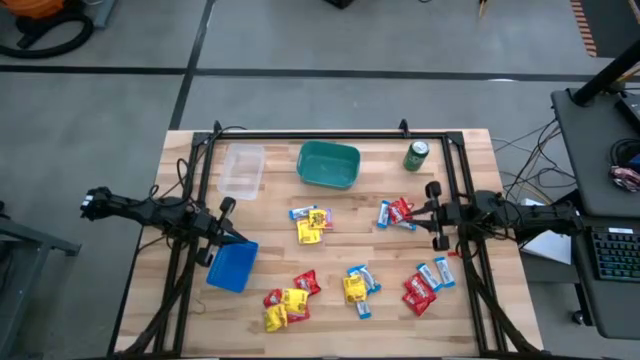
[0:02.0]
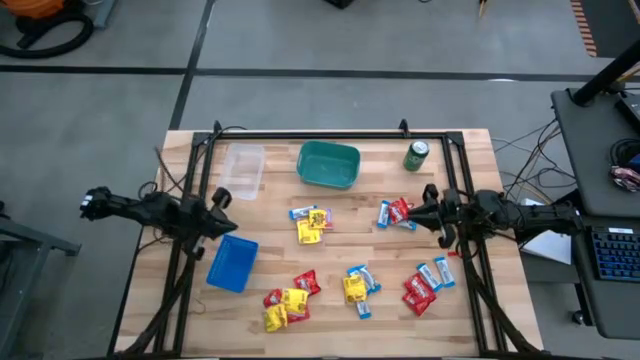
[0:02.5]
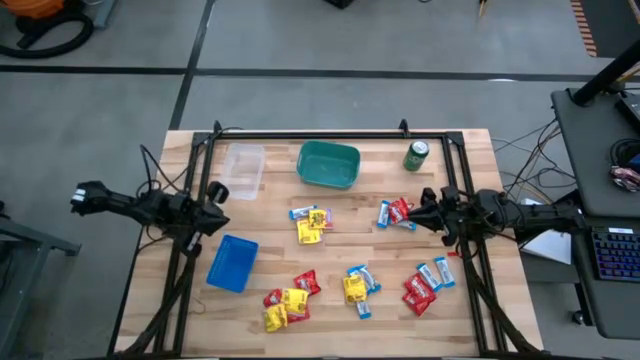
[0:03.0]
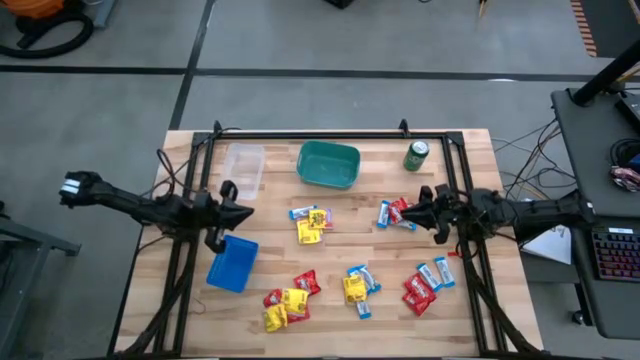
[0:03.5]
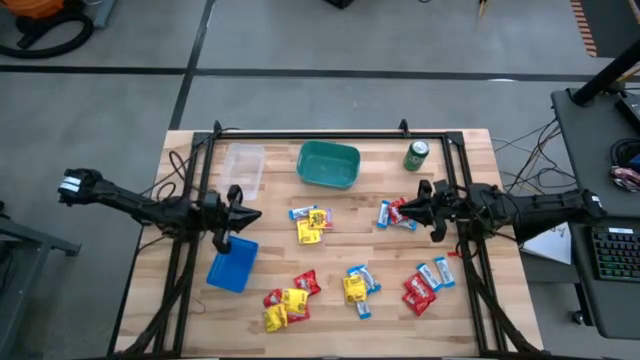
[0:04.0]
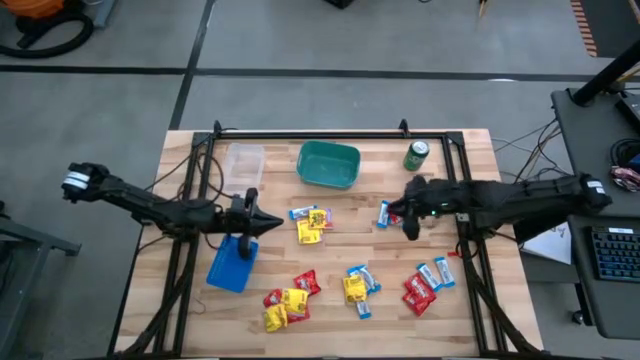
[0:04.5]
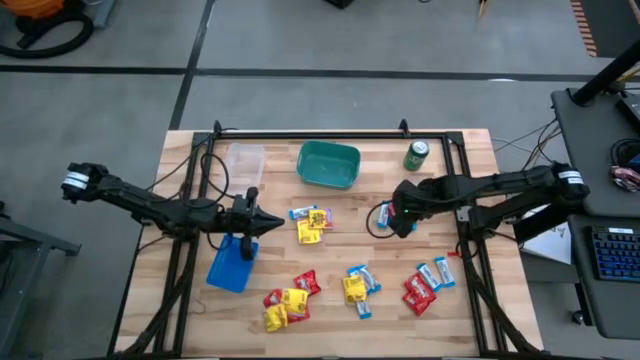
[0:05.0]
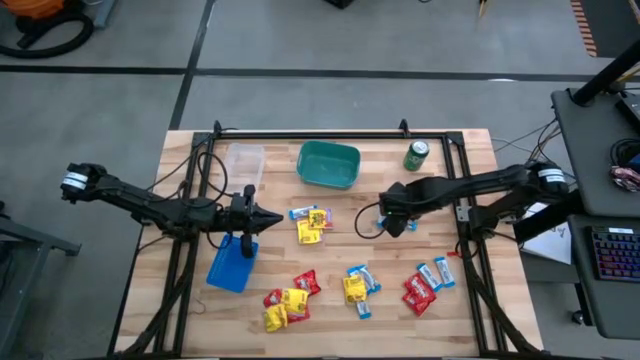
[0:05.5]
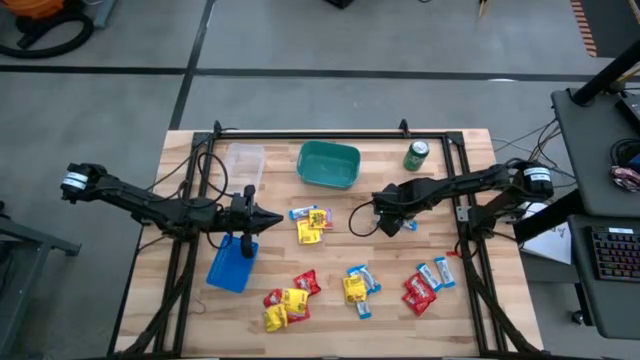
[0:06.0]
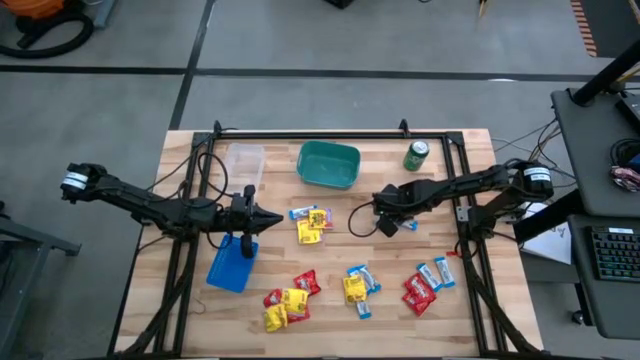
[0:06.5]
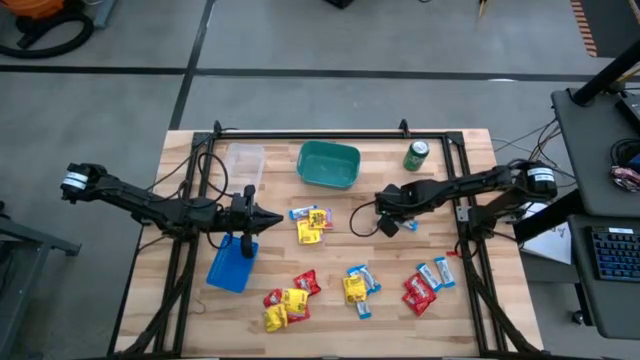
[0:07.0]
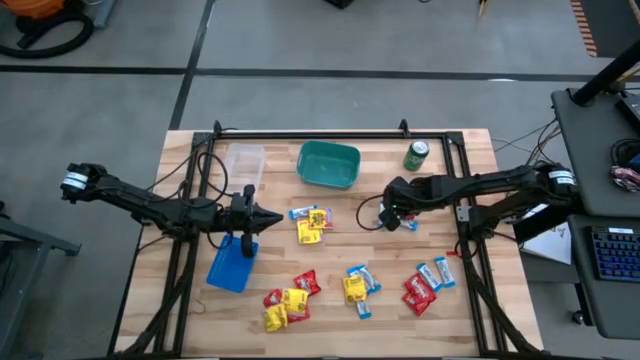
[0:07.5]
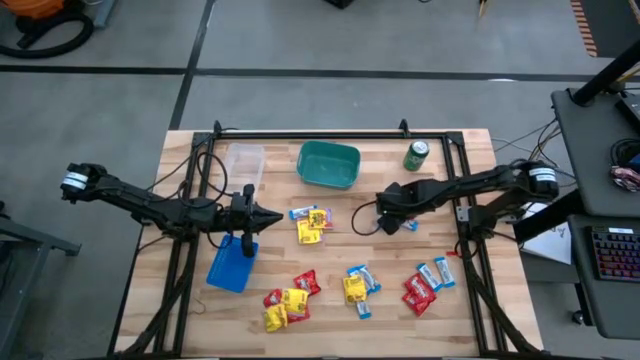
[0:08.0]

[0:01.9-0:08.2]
Task: Sort candy
Put the red candy into the green bin

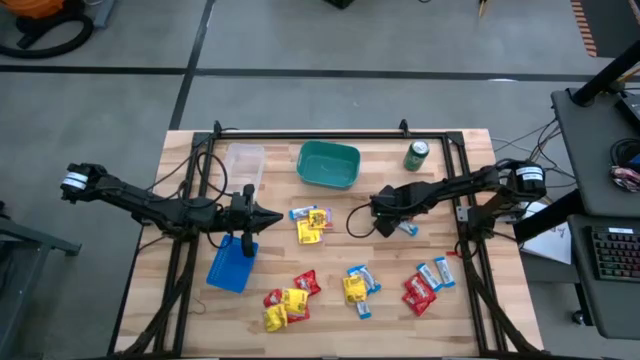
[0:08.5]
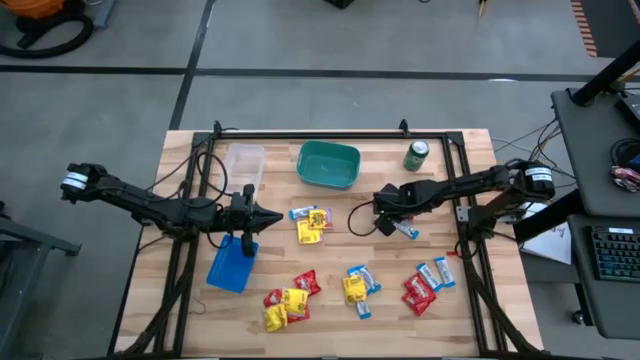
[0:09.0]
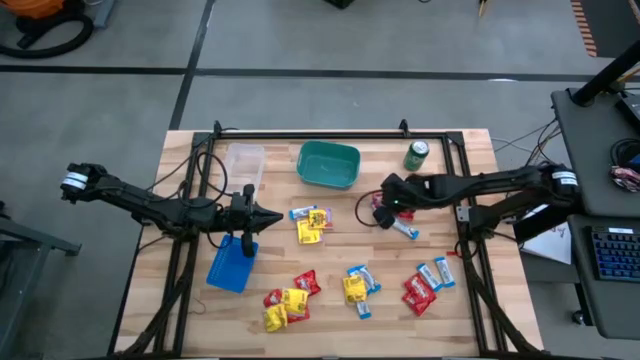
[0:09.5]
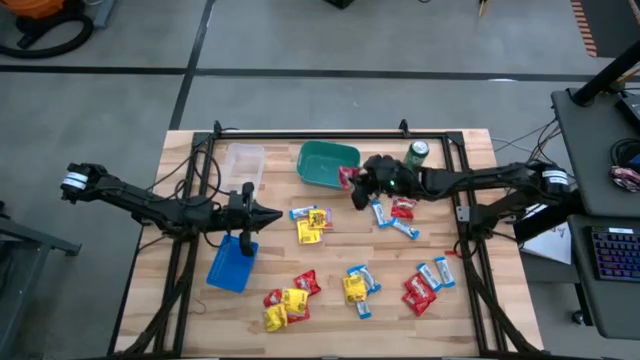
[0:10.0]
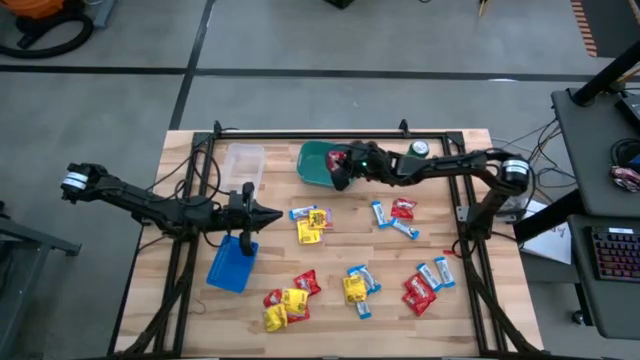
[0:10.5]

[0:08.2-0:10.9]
Put the red candy into the green bin

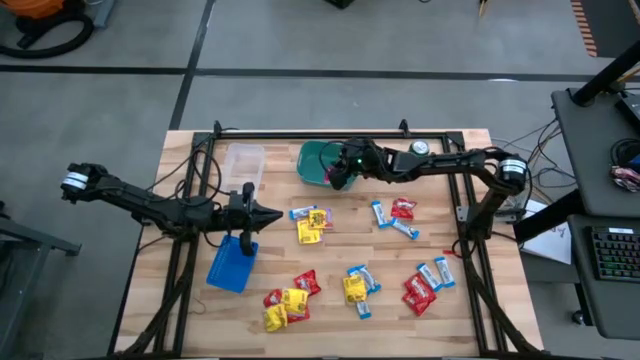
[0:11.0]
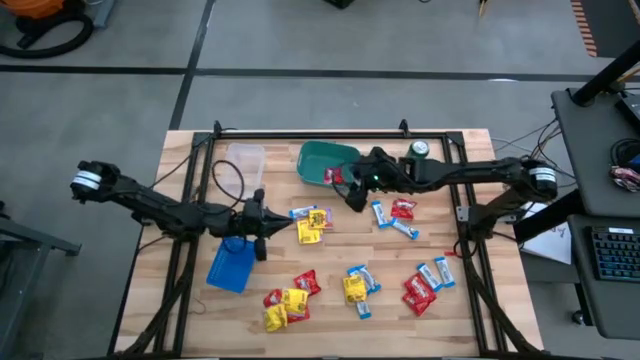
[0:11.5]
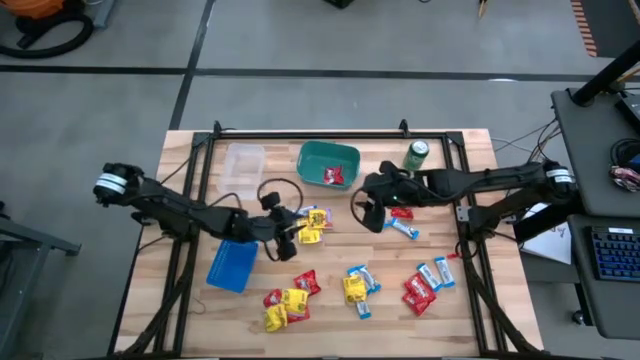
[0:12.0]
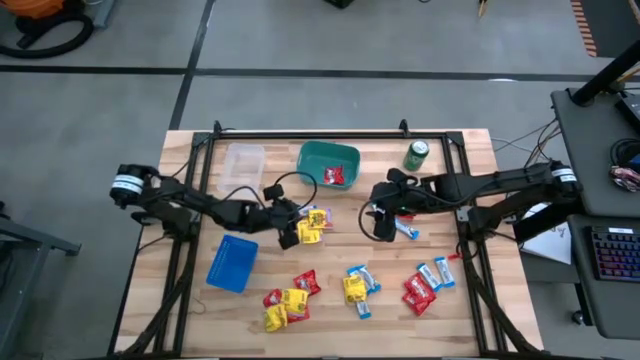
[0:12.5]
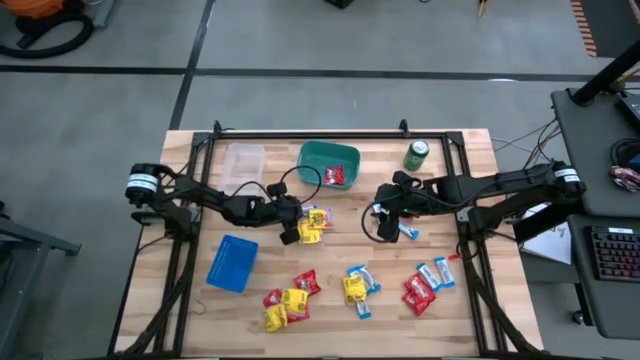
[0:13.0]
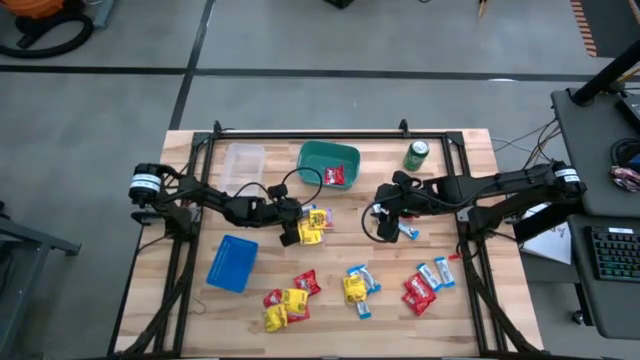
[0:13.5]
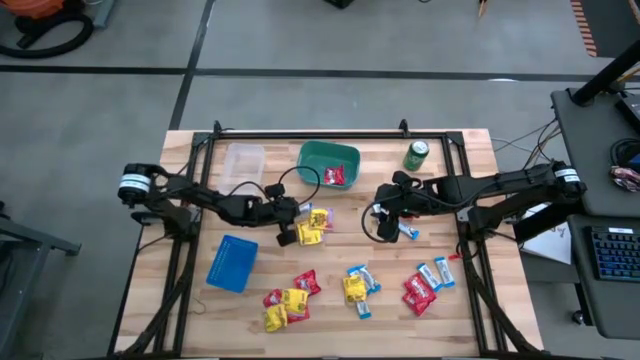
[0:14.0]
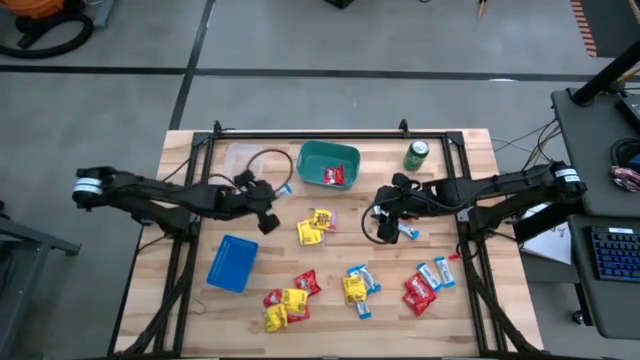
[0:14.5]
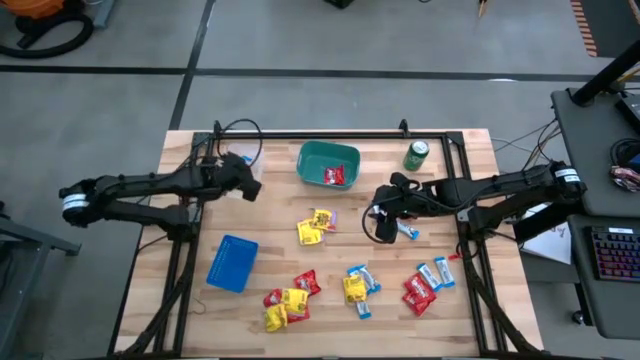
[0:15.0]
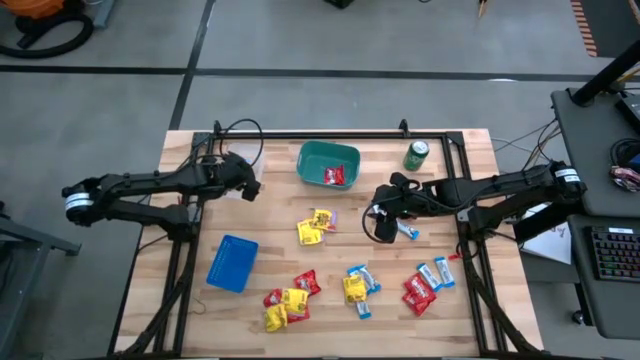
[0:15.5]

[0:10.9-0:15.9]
Put the white candy into the transparent bin

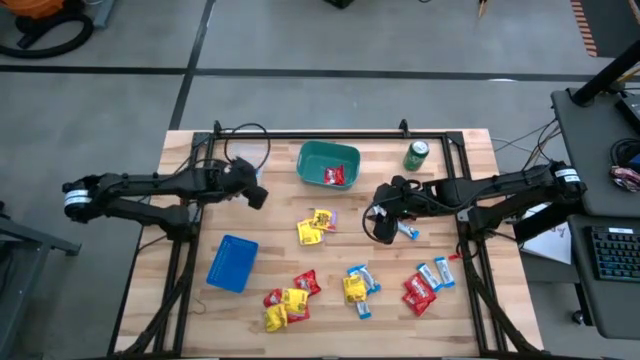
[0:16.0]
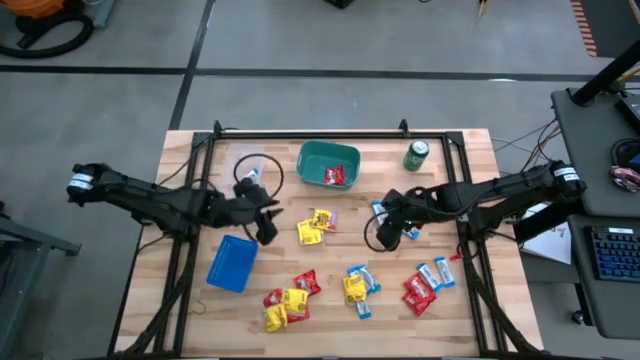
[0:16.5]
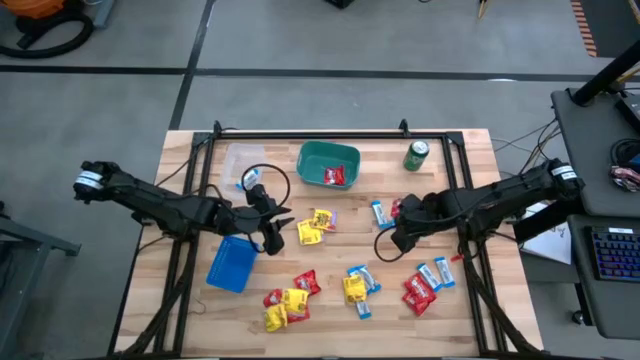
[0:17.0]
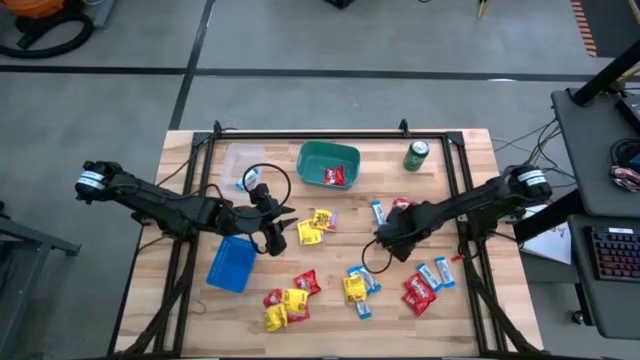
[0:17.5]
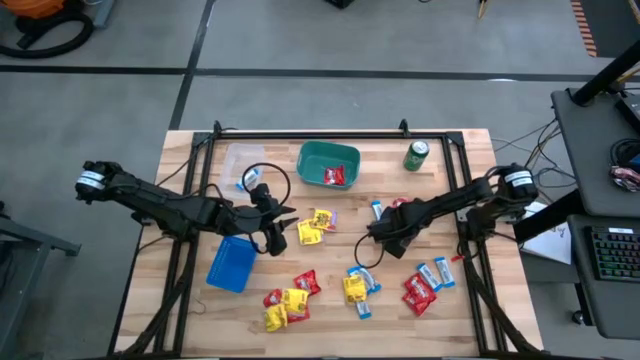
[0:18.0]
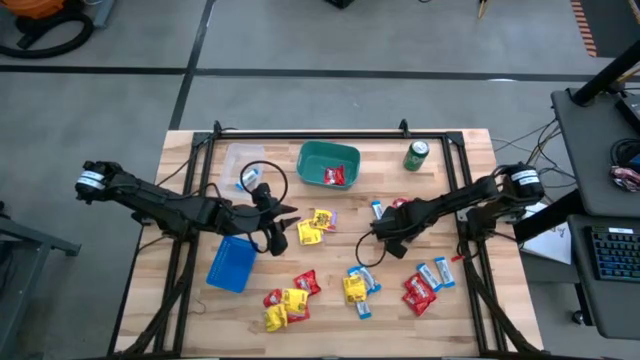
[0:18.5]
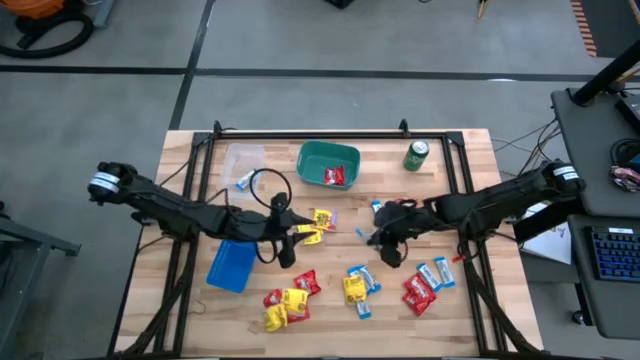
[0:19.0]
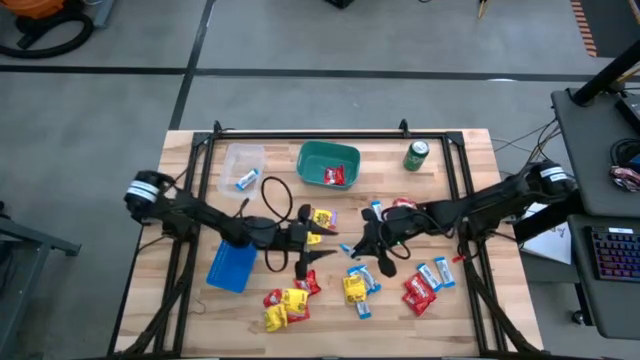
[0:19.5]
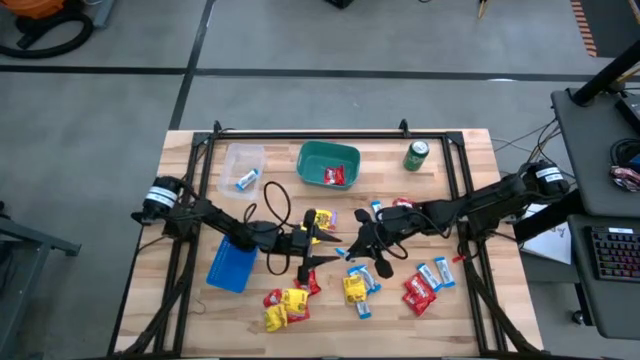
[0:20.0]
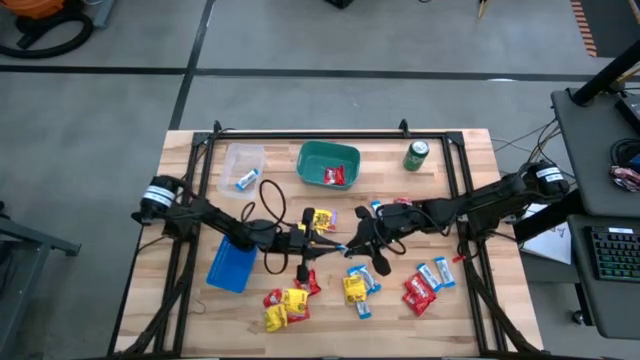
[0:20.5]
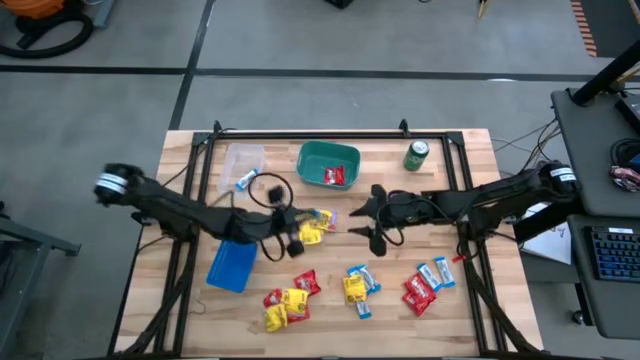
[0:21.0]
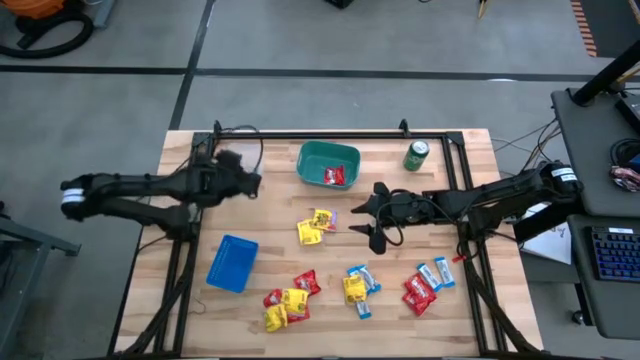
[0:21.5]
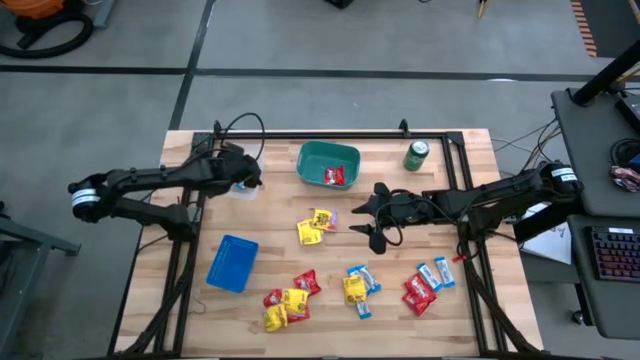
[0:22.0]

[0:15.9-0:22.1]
Put the white candy into the transparent bin
